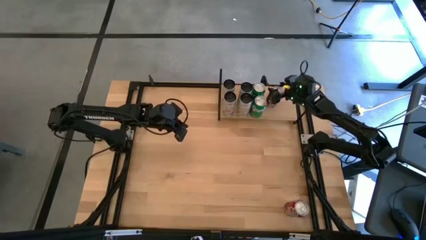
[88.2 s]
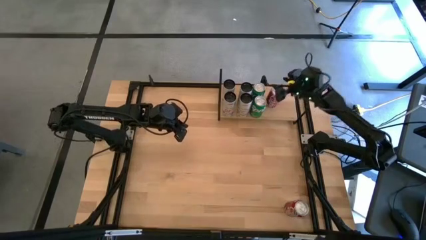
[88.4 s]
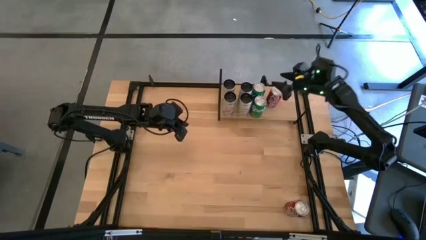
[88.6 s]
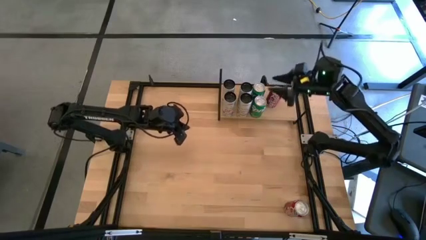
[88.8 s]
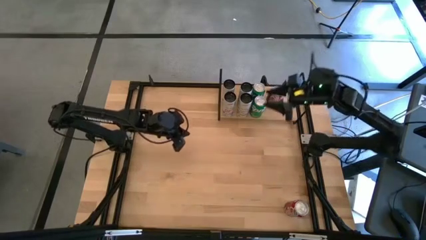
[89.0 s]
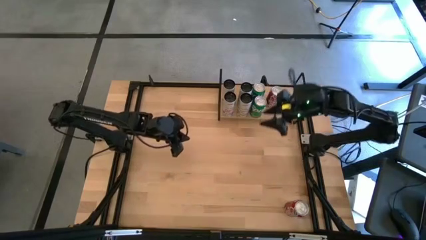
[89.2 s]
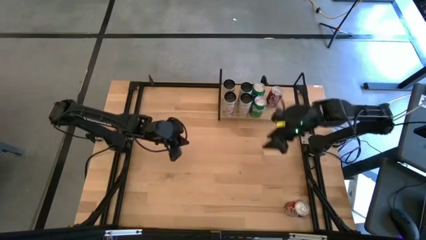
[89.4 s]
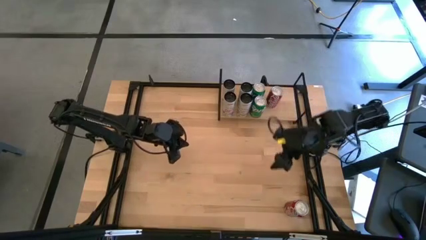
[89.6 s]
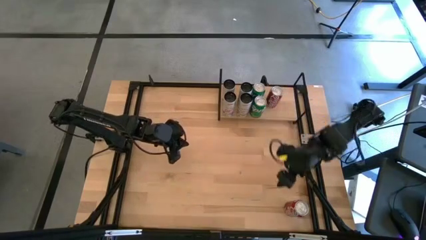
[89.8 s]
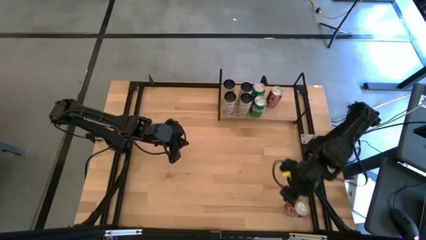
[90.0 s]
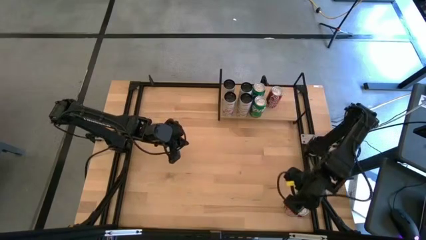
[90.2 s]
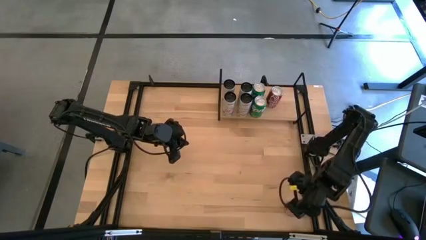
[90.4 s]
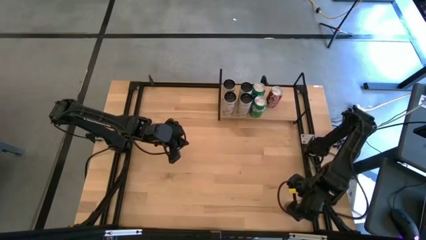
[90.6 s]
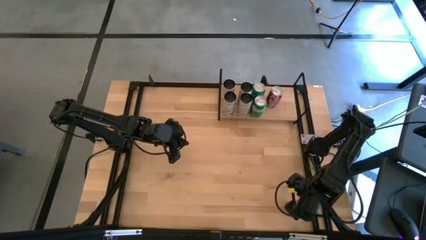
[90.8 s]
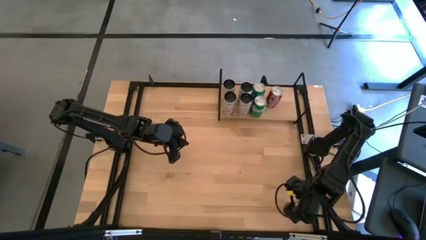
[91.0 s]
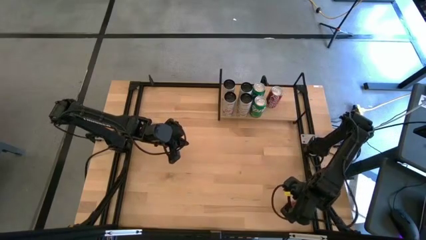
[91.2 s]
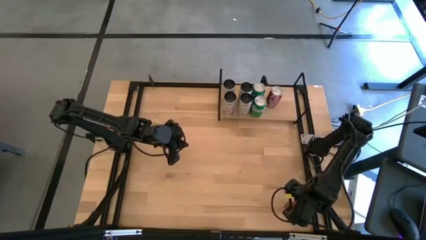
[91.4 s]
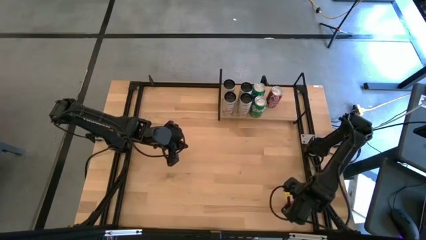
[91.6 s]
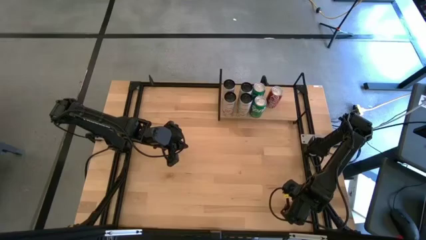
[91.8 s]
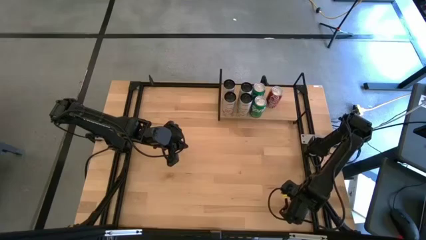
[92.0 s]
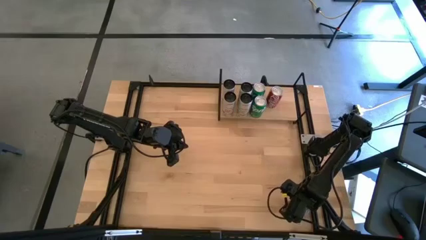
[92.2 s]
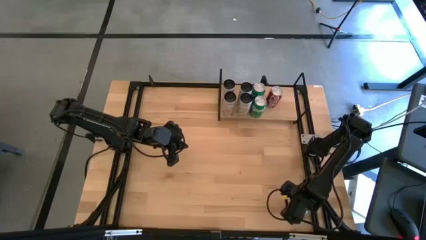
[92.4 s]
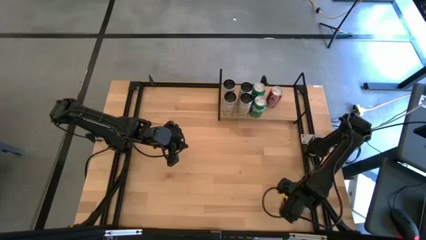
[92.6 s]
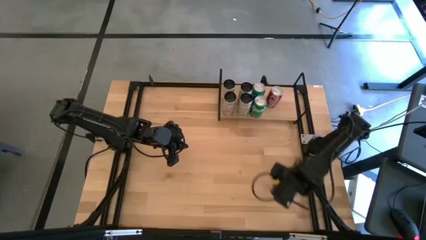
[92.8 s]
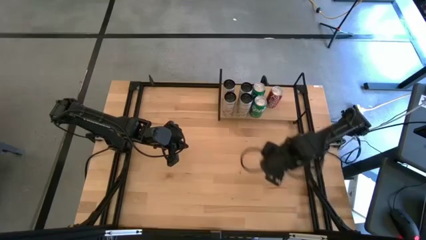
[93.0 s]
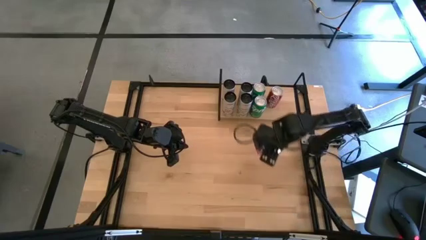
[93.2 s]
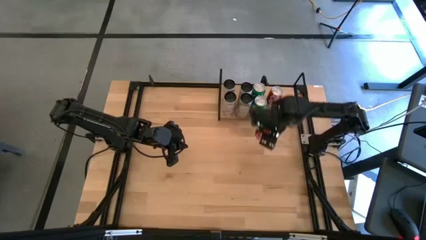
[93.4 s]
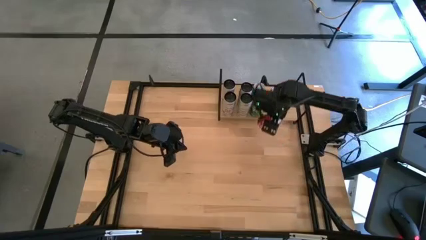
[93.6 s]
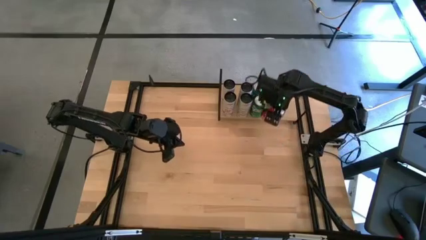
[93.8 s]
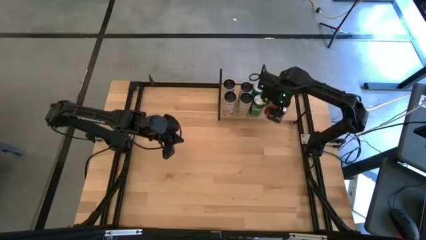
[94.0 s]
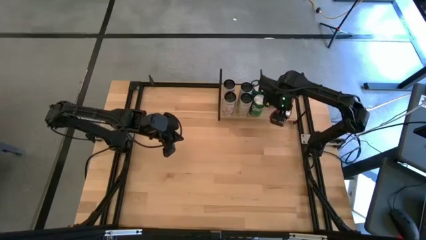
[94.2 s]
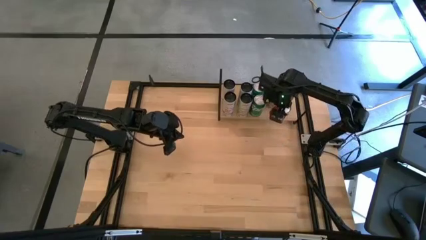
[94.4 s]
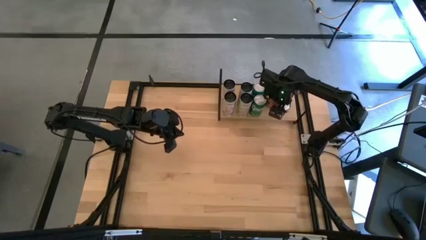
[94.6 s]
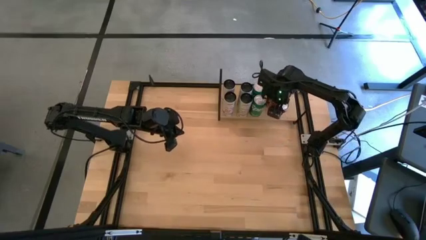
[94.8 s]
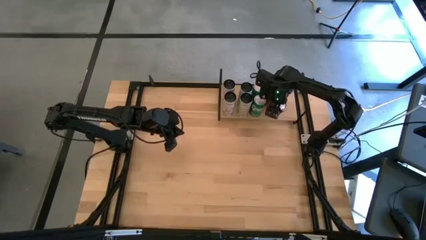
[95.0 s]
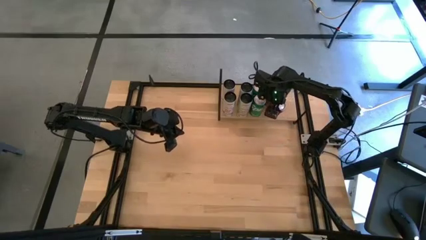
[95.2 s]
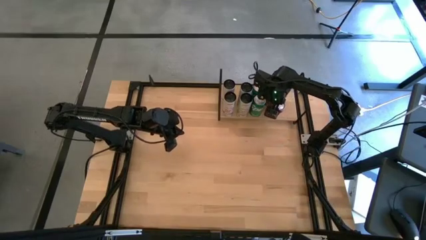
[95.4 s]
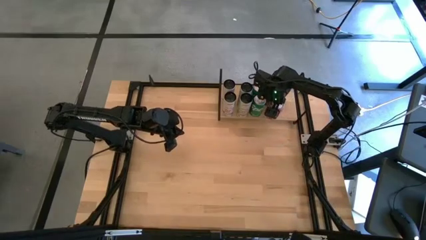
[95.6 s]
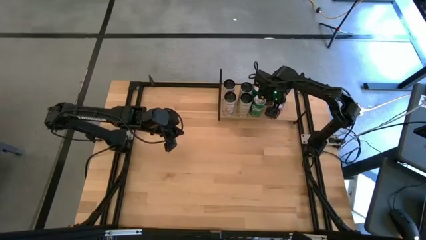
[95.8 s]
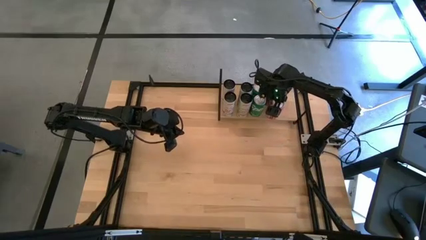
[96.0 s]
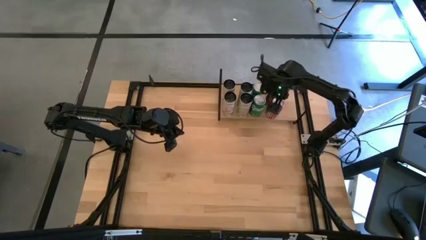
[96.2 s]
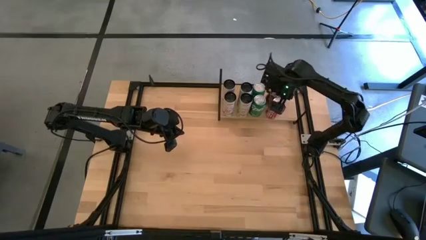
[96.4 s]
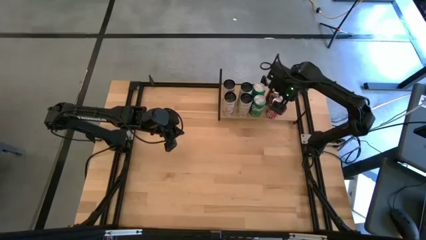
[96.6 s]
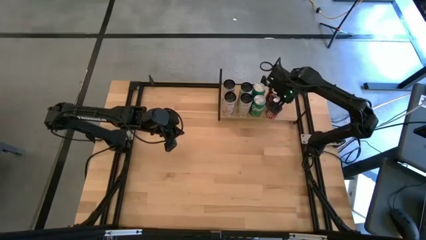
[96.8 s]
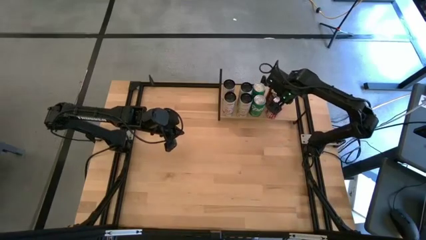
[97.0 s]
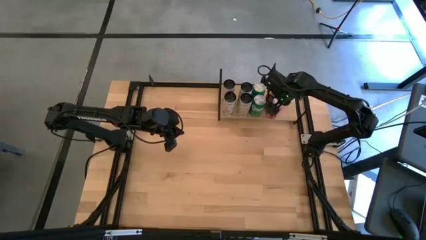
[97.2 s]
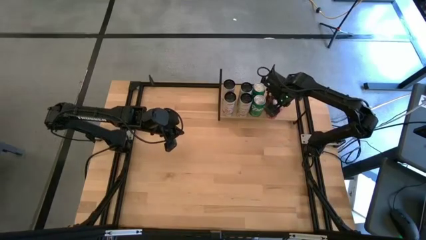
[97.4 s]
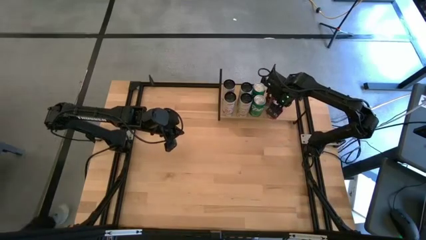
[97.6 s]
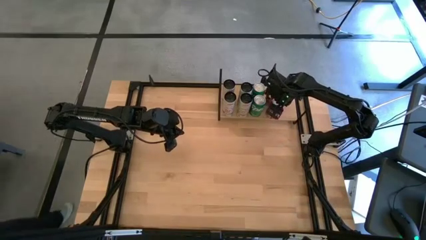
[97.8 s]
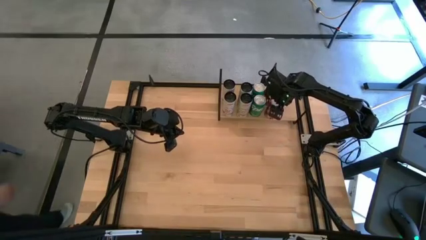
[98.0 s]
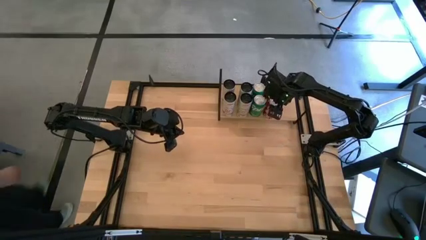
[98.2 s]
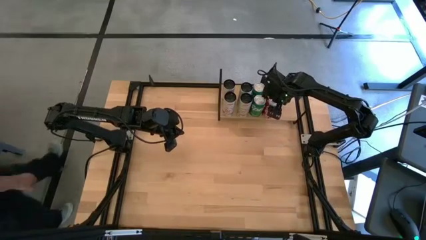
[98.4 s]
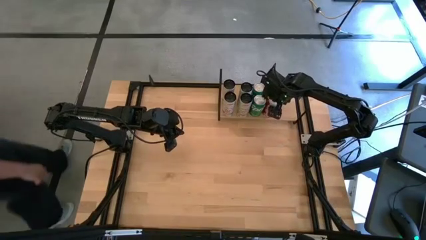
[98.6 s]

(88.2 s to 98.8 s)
Task: Place canned beverage on shelf
Put the red-white soda can on the shelf aligned with the other red-white soda can

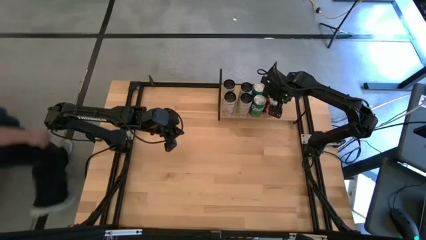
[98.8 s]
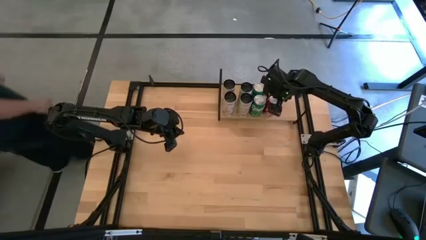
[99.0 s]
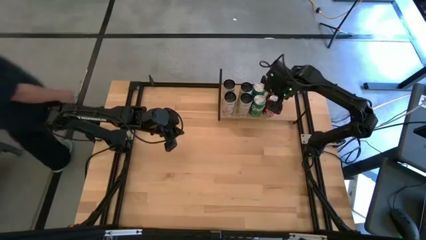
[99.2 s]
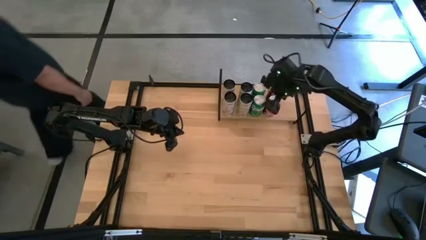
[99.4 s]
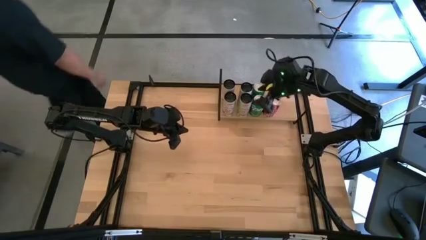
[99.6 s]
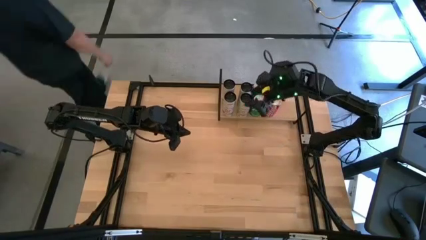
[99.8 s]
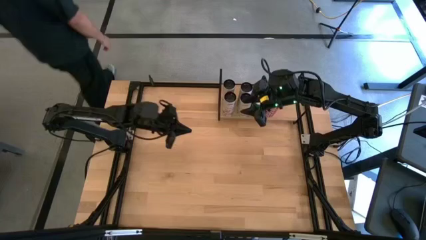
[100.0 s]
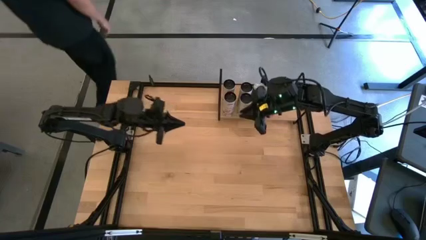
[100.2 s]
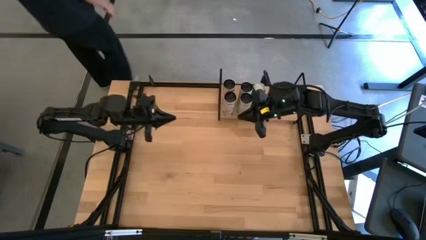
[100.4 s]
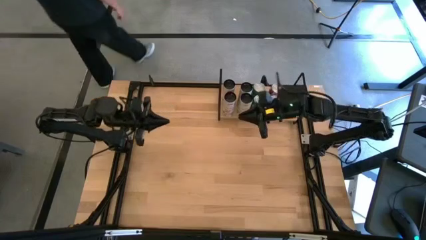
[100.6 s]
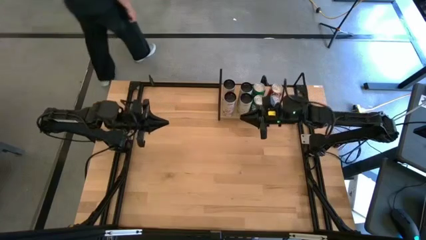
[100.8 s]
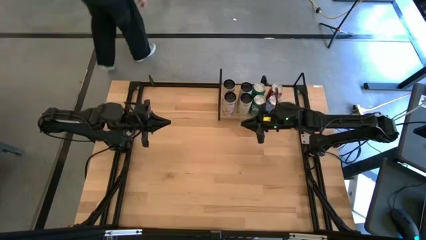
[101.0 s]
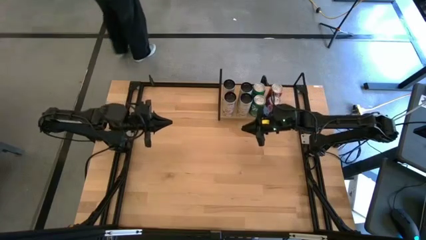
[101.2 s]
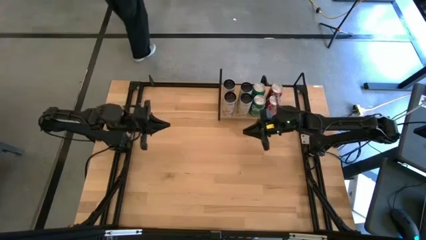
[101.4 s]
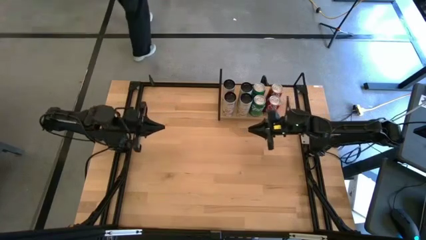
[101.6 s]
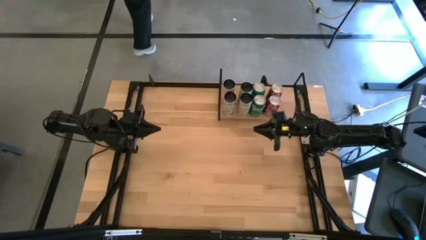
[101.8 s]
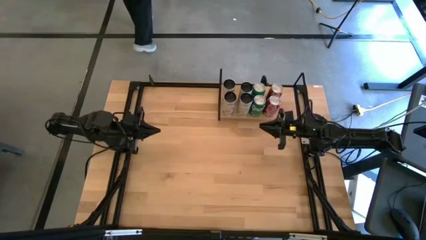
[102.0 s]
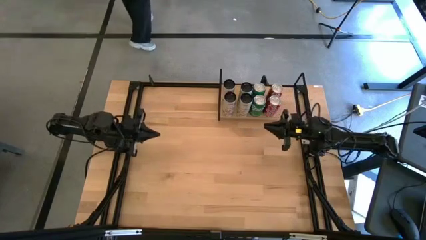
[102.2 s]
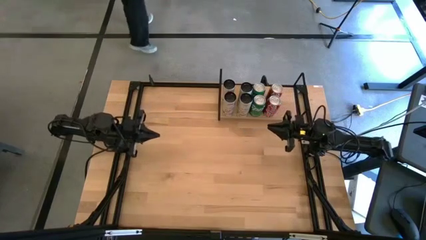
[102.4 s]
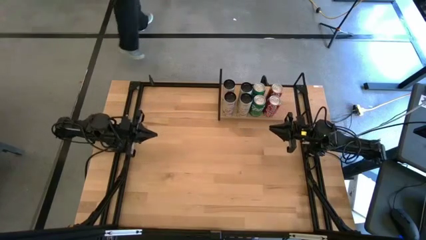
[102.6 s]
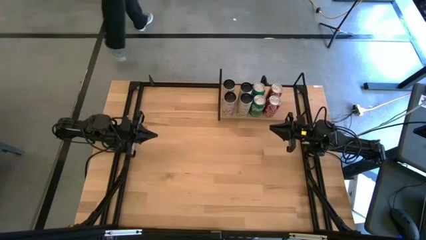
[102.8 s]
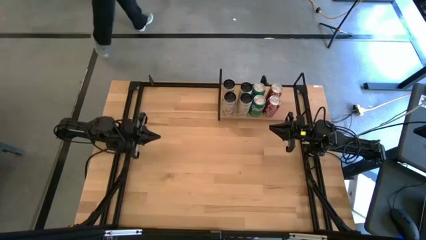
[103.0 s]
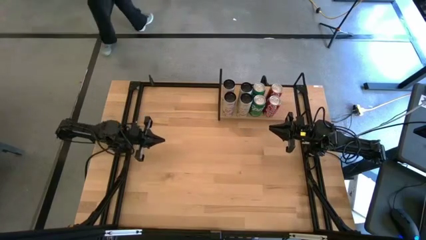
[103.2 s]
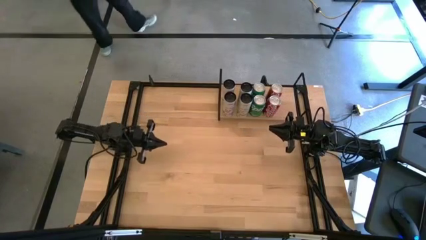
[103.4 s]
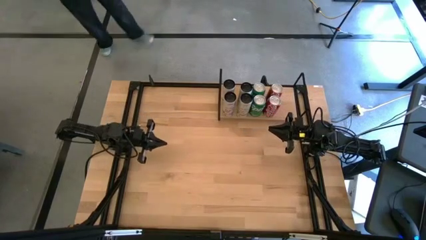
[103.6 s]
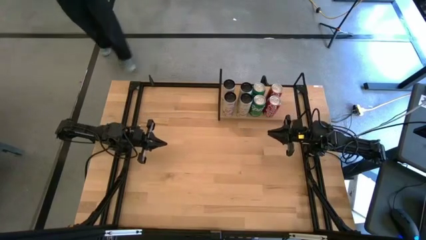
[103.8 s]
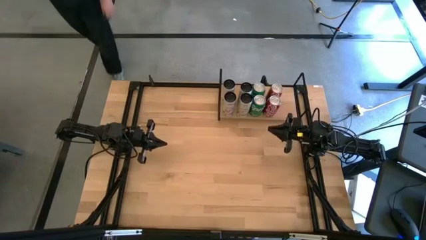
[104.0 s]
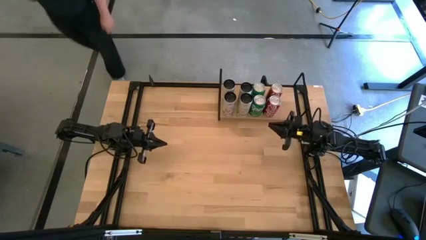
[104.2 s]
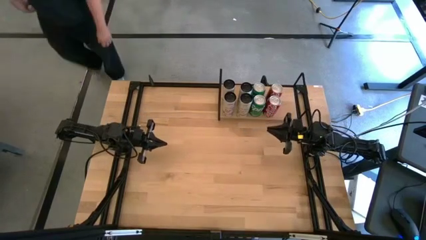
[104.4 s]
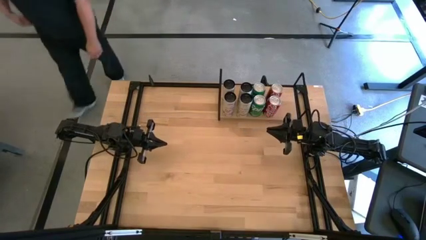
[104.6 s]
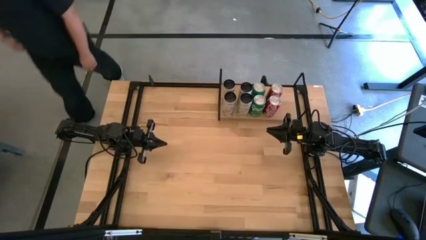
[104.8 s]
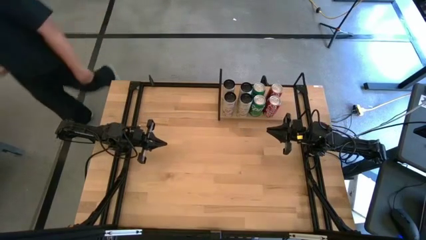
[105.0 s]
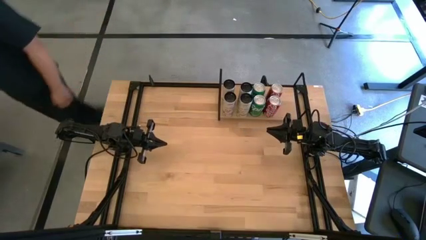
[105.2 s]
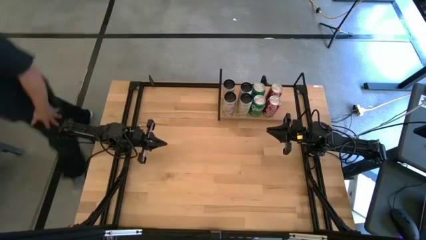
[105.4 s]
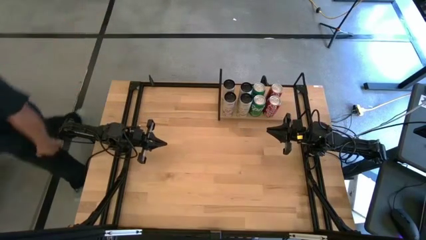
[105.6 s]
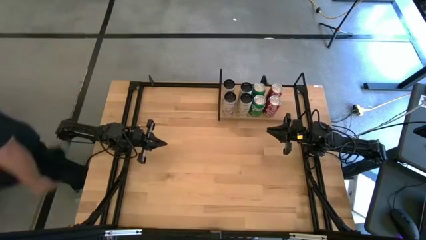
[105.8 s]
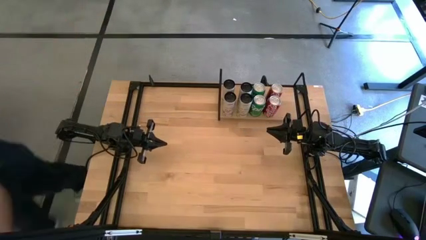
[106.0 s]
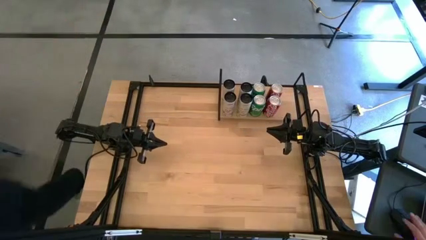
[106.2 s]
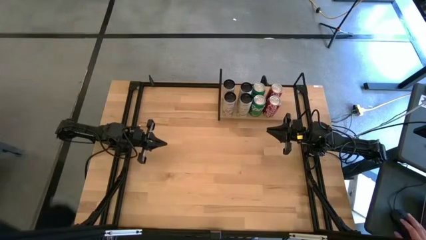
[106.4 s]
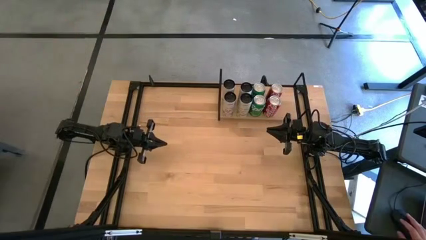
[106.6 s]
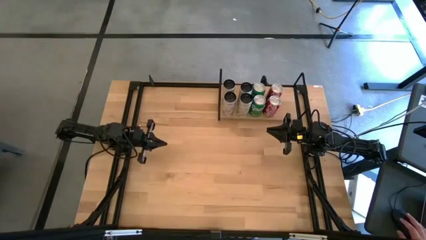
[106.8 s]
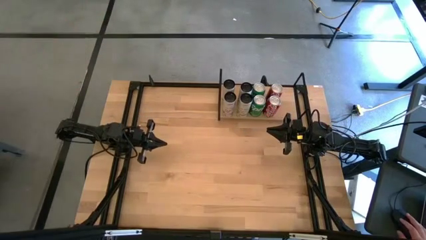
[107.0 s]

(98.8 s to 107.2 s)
Return to Home Position
